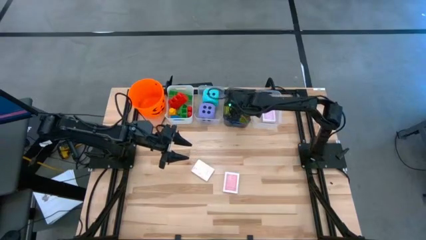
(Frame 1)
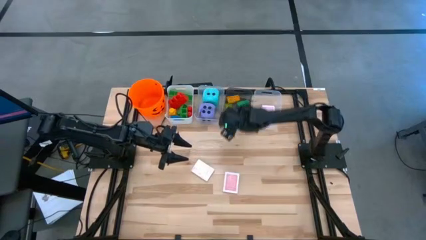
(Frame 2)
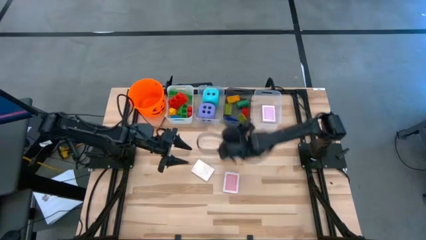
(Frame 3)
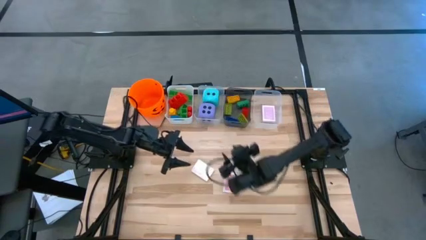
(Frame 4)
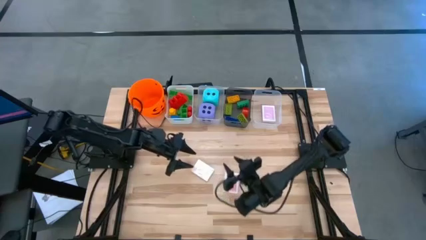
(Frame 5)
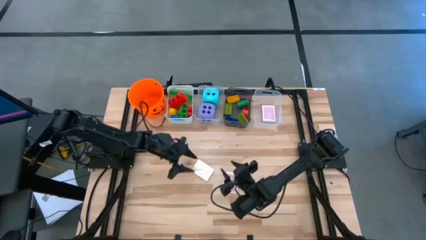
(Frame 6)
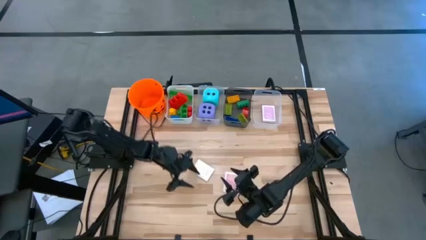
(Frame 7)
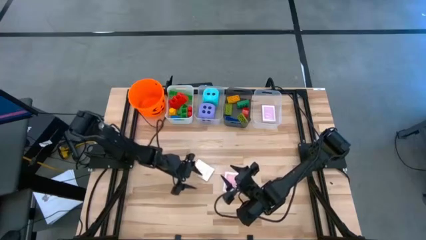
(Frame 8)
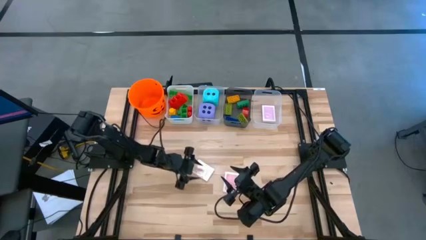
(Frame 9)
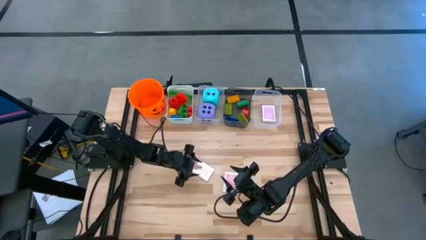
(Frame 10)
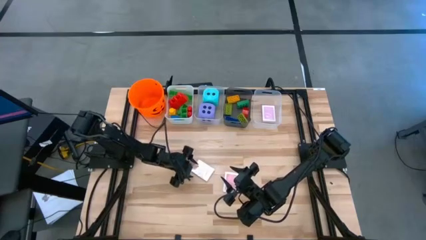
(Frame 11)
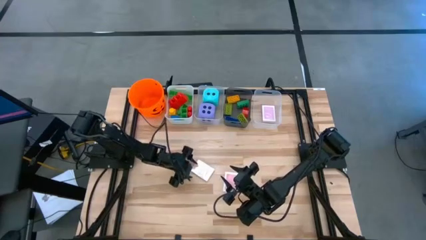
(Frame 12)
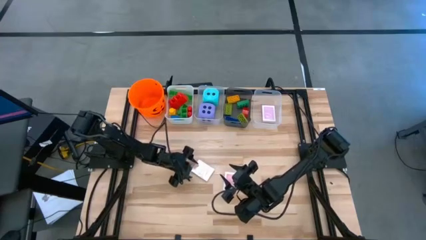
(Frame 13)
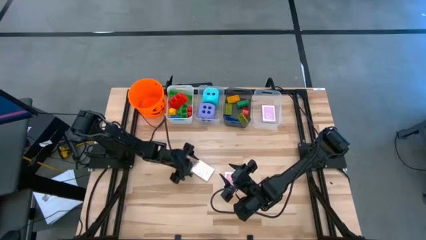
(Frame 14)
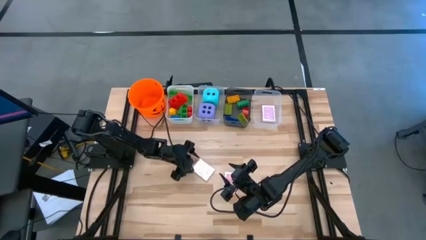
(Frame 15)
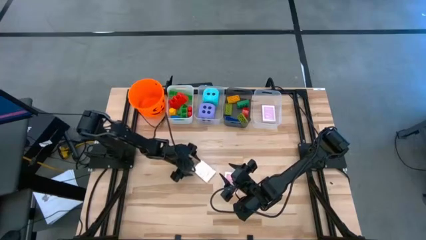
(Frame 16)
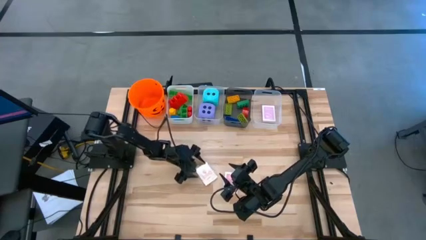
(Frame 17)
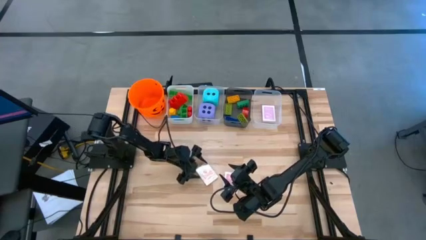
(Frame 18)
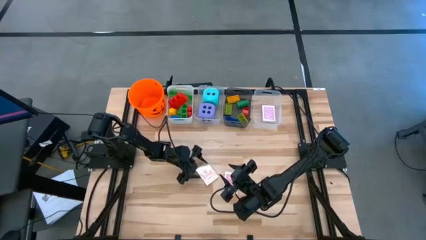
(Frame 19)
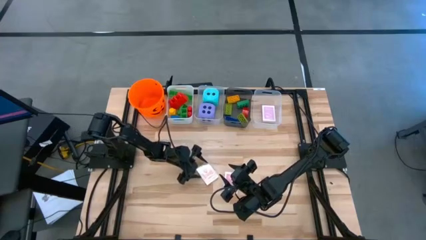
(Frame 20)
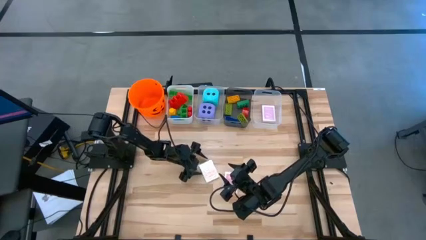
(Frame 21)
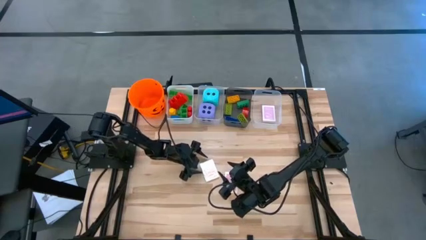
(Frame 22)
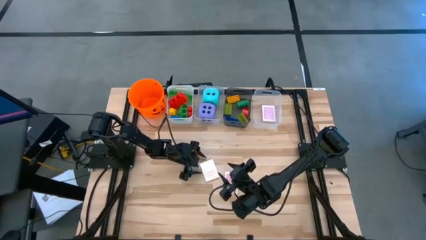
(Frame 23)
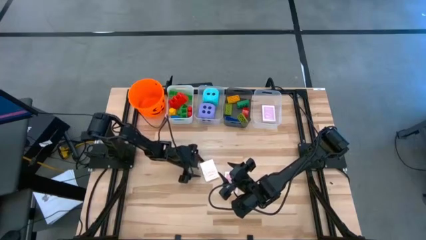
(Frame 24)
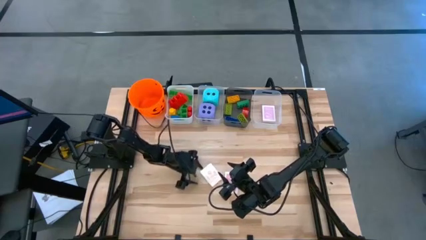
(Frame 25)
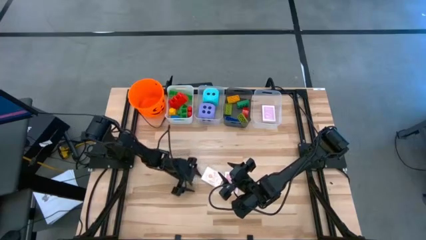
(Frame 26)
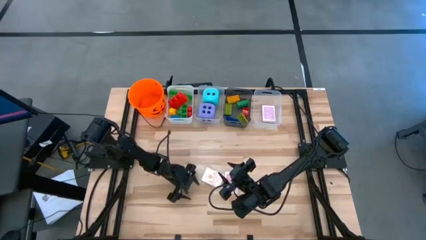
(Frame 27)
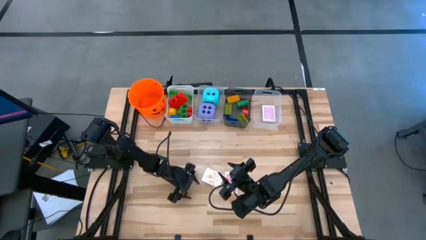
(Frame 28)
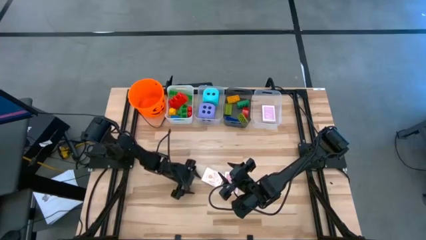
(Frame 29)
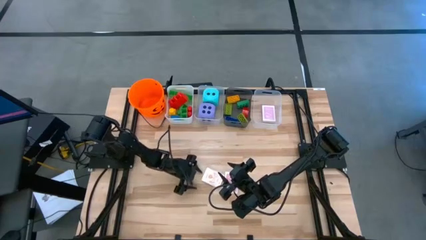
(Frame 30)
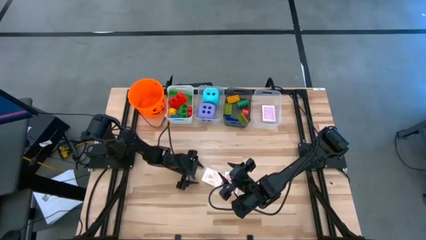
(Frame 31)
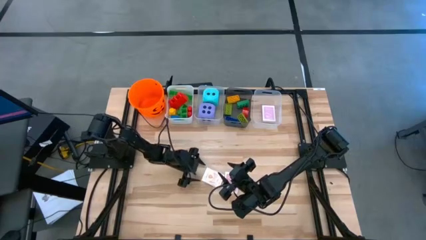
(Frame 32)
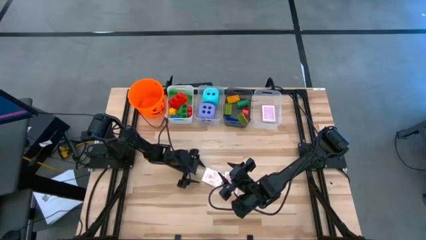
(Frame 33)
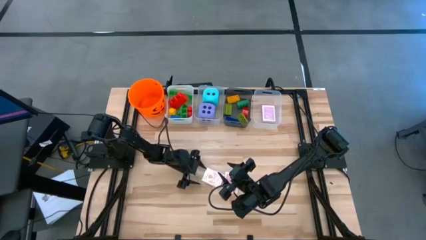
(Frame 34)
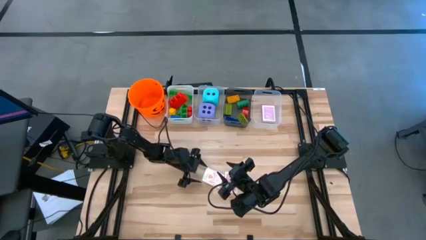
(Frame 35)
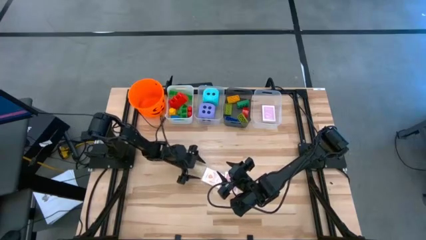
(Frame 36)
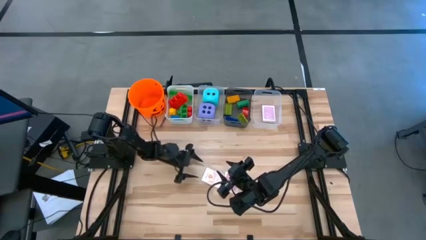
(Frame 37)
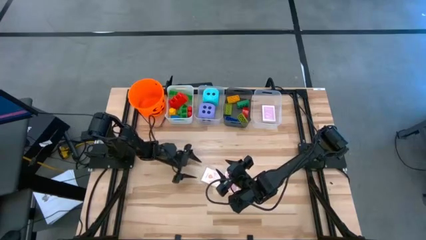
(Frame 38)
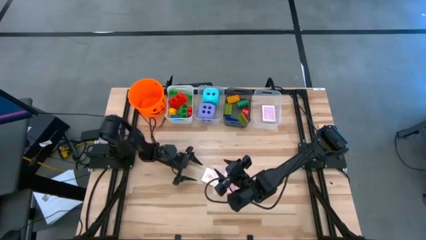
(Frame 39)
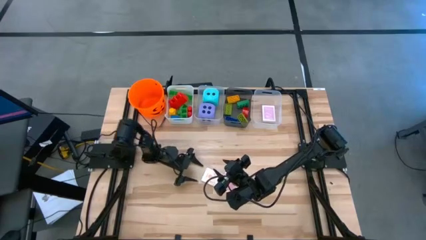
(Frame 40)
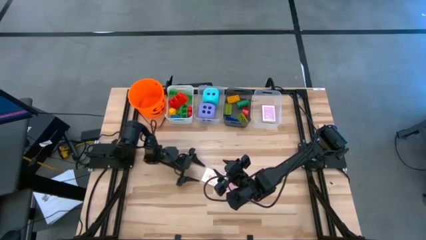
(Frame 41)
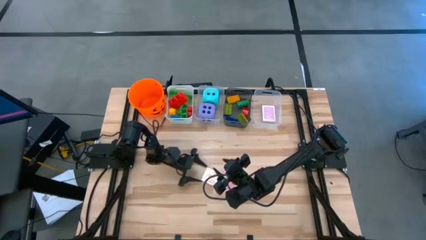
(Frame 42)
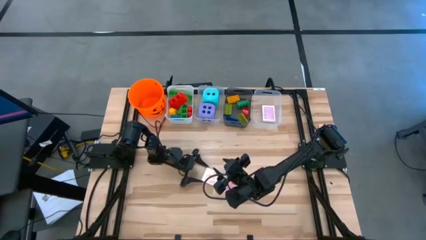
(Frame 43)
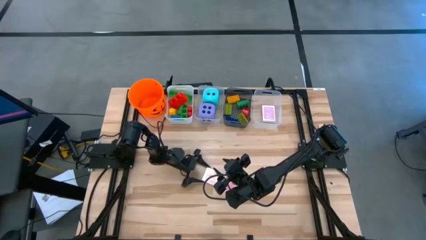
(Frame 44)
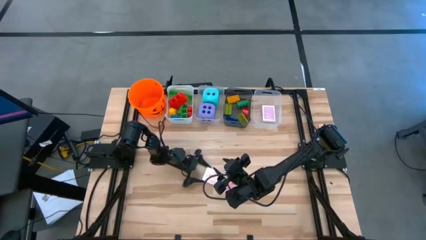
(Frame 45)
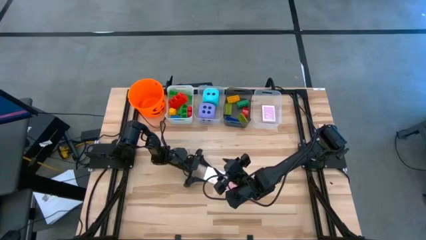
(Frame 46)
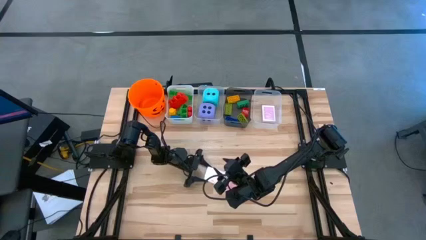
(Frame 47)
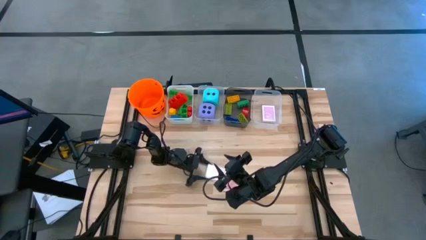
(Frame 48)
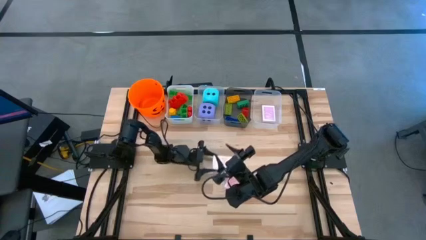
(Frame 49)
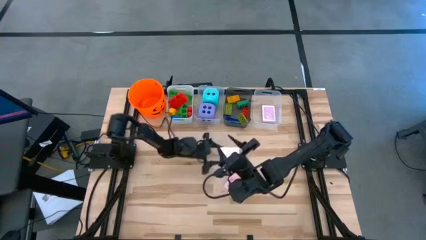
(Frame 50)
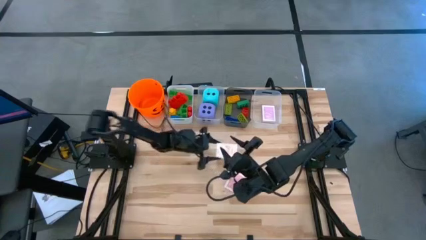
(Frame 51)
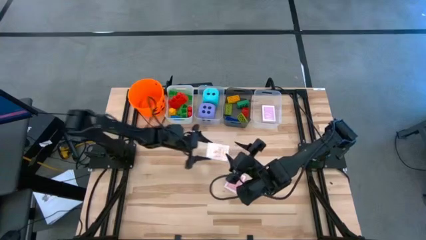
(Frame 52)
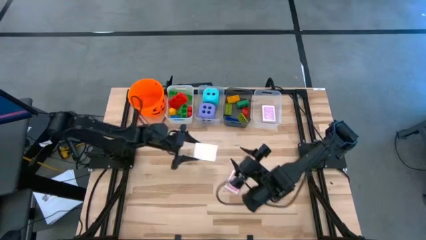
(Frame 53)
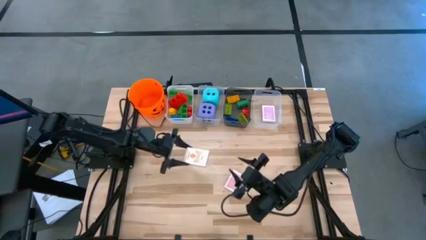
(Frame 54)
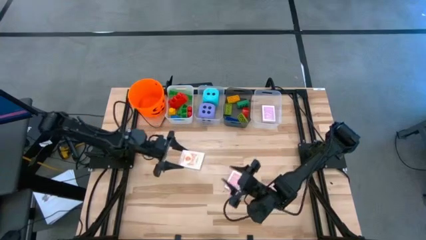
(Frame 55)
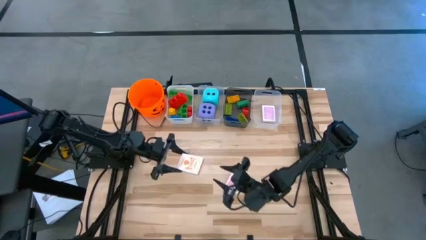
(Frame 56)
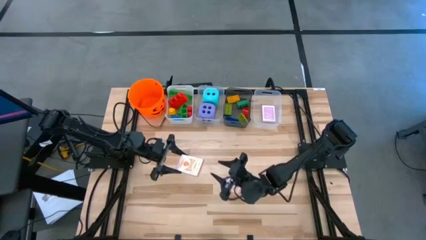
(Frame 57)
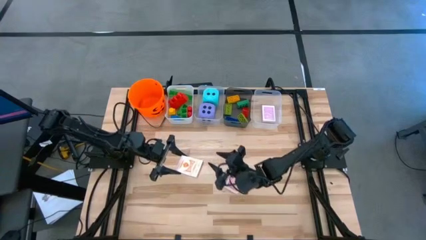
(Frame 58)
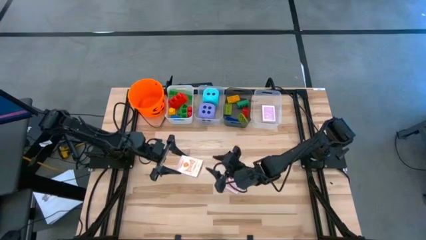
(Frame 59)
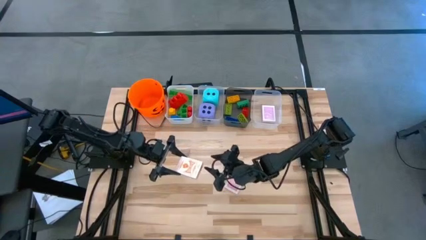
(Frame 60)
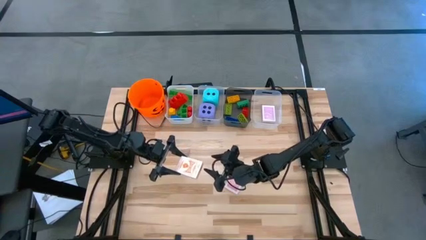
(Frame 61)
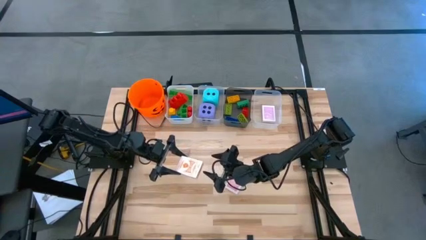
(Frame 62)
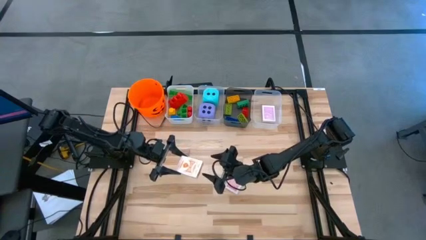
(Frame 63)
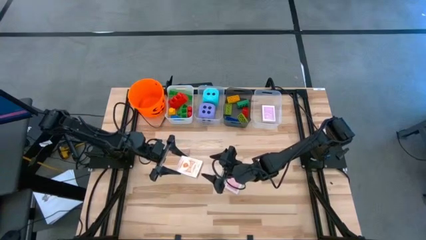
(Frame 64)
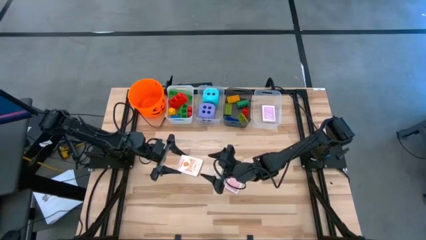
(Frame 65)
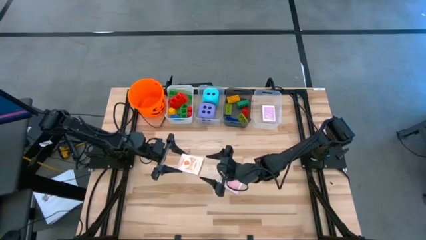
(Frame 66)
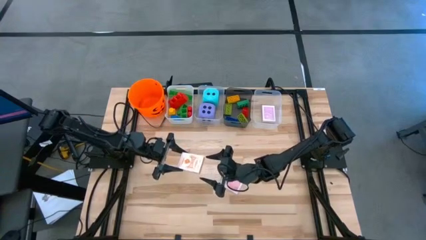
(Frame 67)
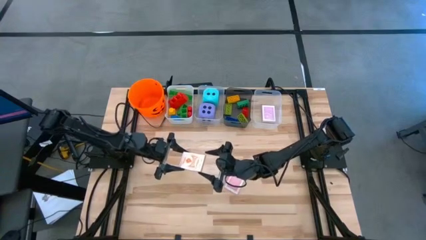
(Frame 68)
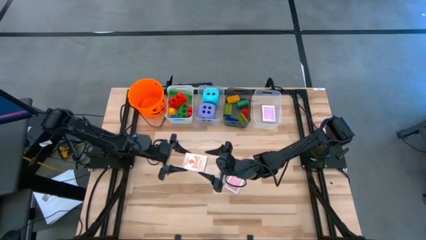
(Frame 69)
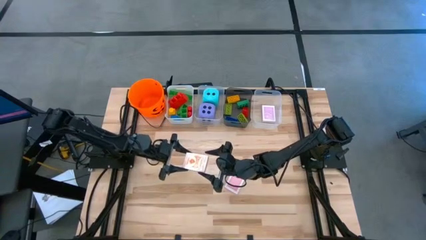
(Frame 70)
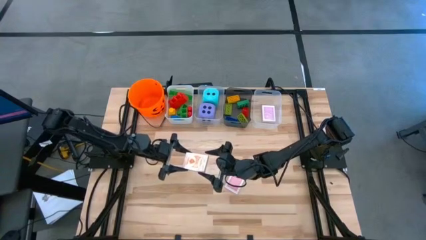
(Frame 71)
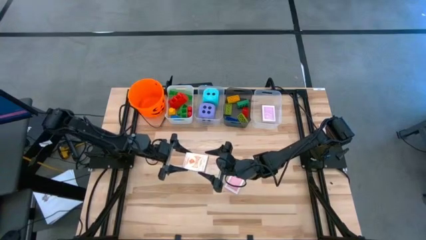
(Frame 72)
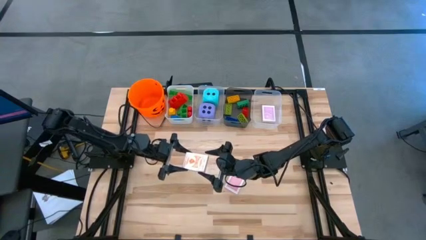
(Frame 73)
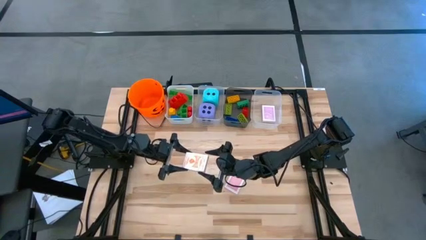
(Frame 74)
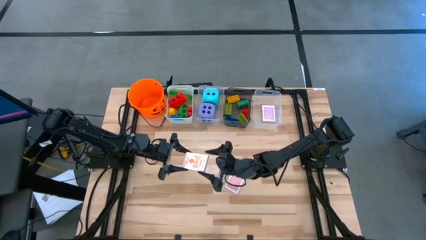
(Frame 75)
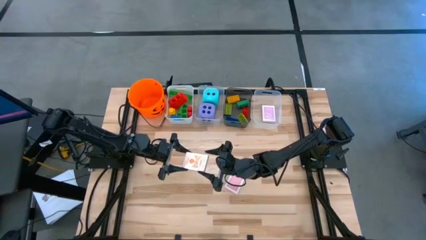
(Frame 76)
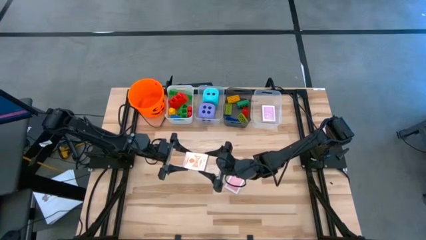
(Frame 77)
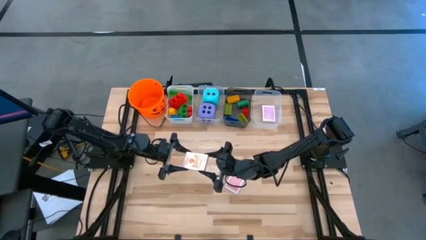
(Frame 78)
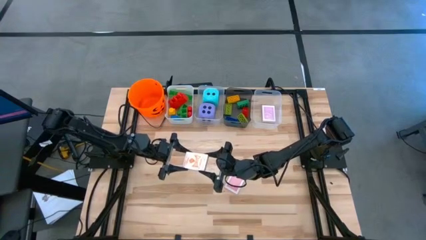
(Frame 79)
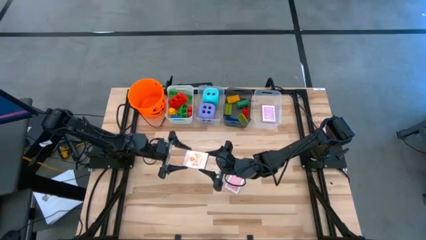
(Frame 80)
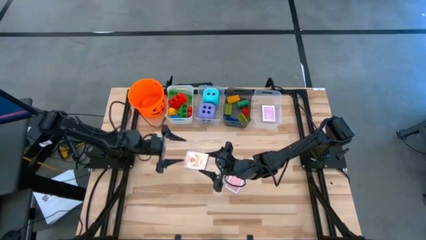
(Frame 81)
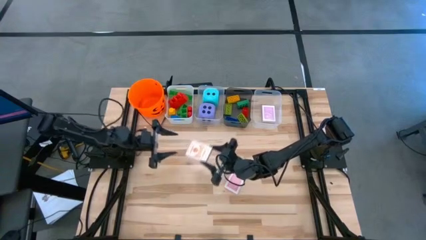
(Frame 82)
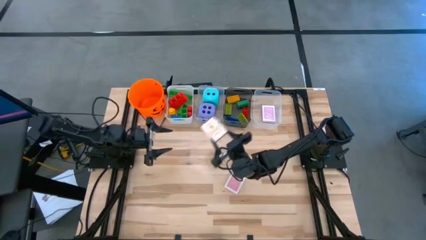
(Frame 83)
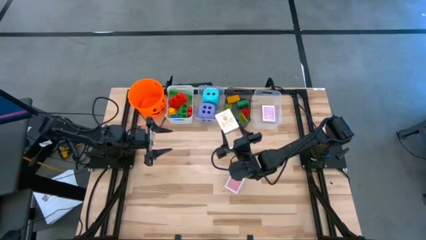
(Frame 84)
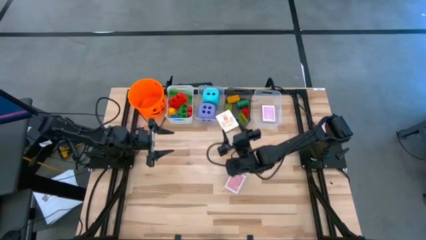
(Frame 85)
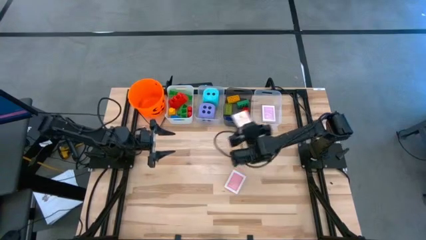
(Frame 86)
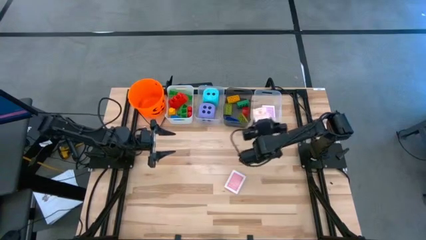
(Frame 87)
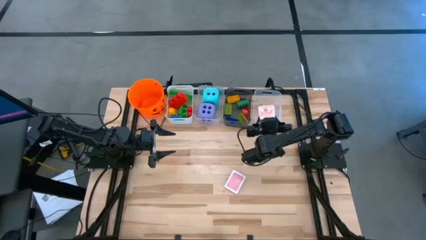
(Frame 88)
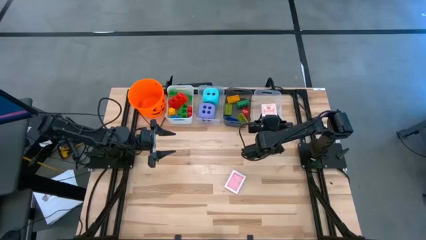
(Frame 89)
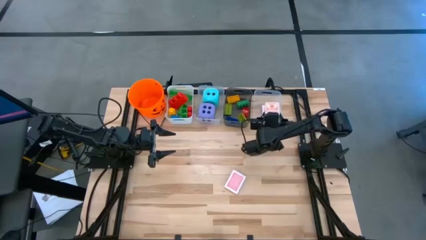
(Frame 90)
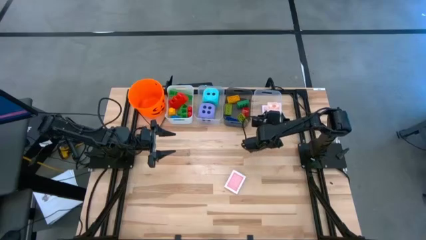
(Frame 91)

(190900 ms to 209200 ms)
Task: Pick & Place Toys
Put the white deck of cards into the right transparent bin
